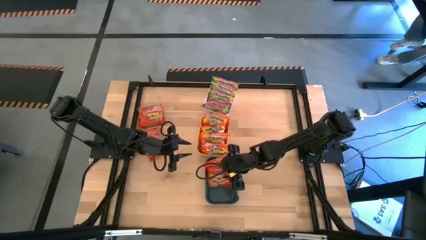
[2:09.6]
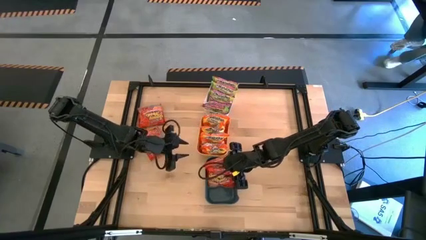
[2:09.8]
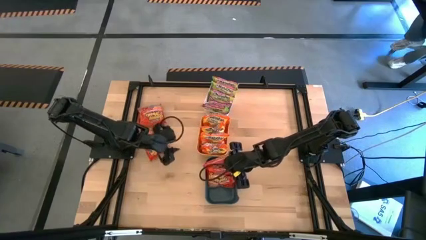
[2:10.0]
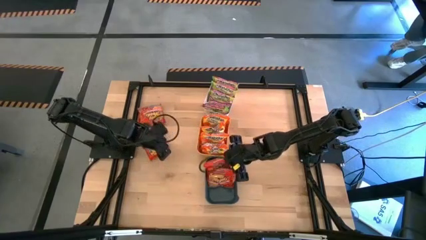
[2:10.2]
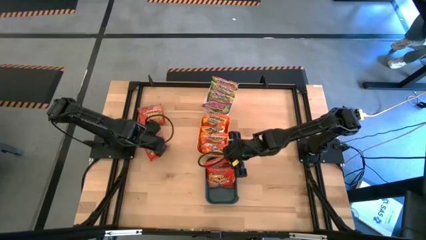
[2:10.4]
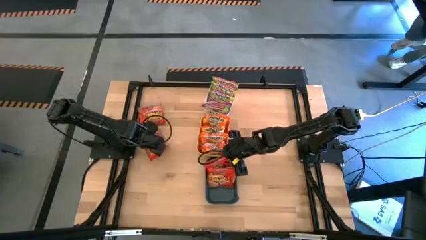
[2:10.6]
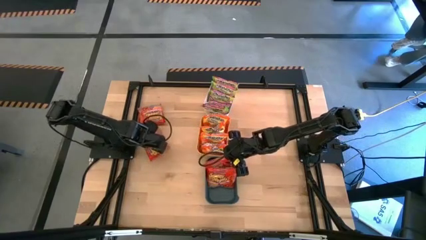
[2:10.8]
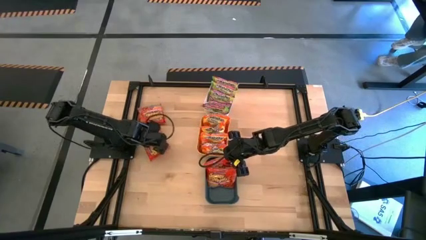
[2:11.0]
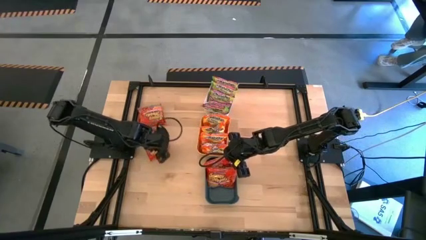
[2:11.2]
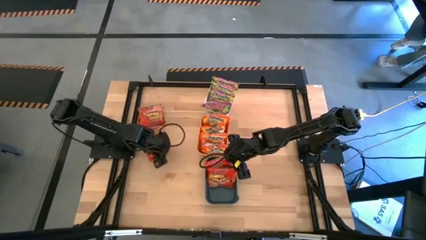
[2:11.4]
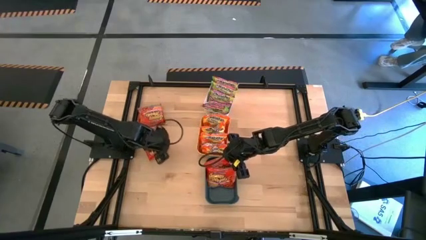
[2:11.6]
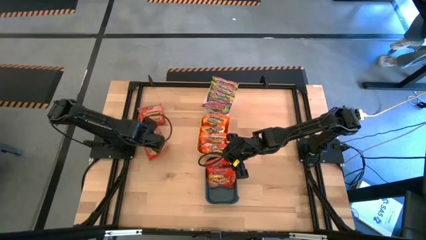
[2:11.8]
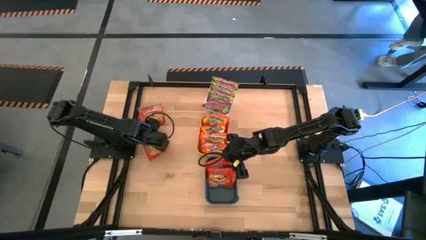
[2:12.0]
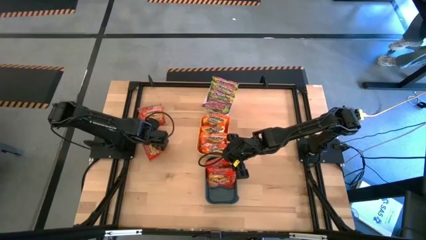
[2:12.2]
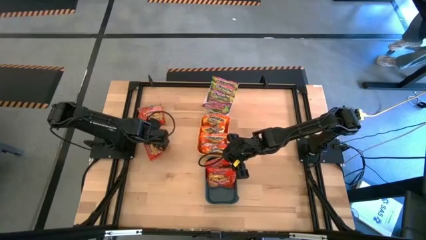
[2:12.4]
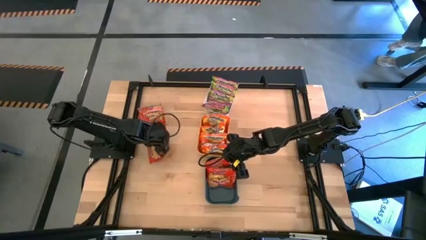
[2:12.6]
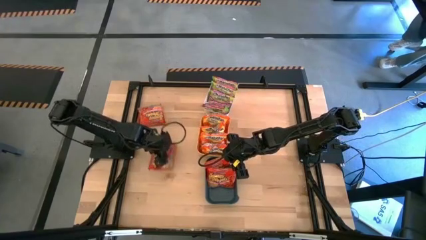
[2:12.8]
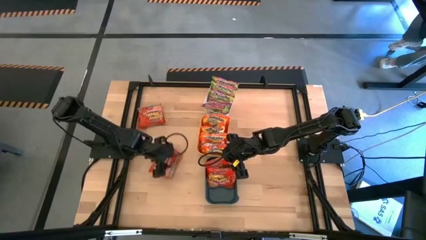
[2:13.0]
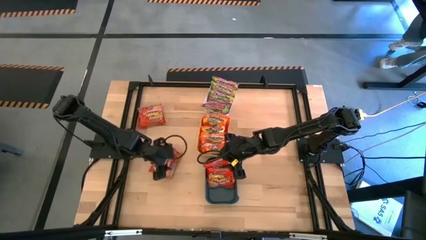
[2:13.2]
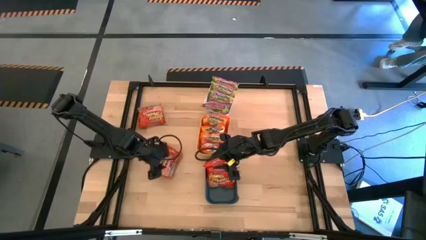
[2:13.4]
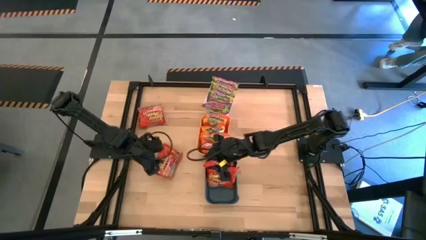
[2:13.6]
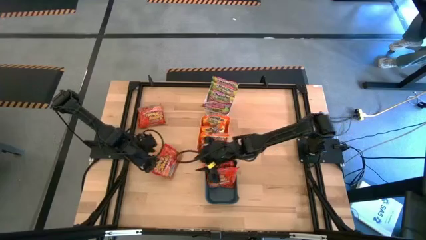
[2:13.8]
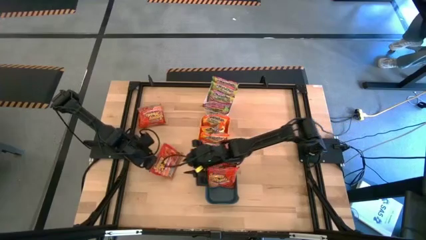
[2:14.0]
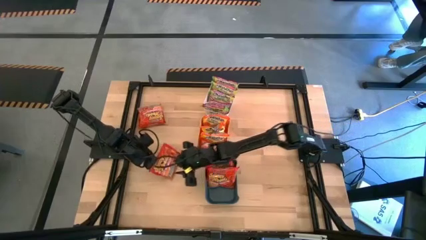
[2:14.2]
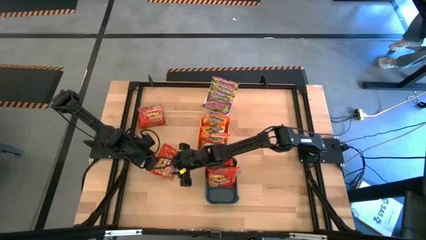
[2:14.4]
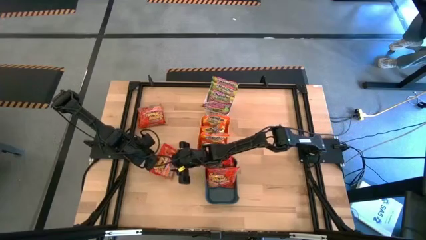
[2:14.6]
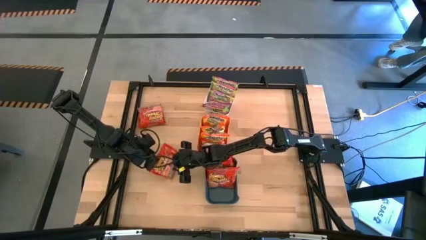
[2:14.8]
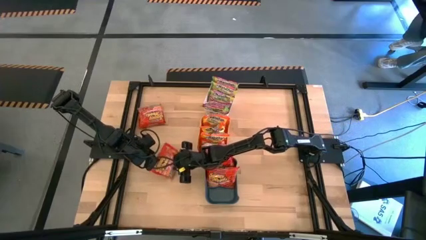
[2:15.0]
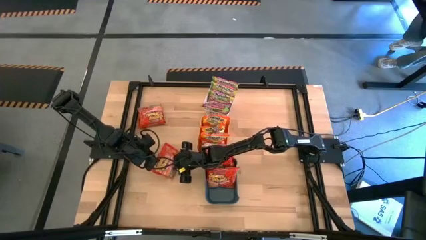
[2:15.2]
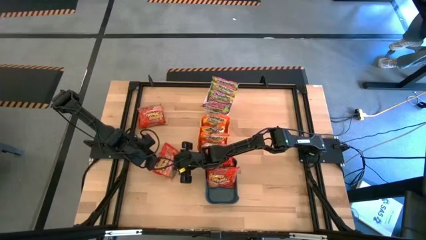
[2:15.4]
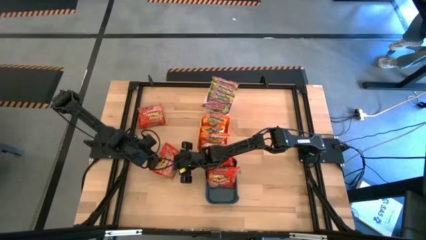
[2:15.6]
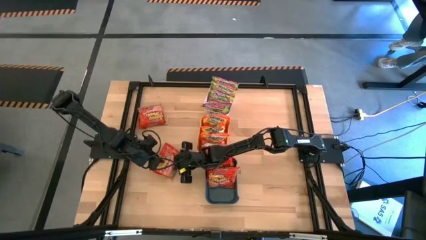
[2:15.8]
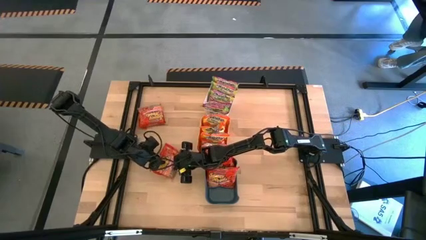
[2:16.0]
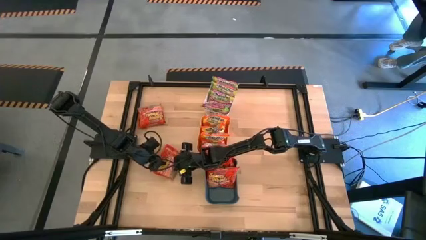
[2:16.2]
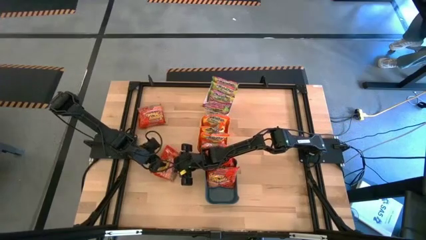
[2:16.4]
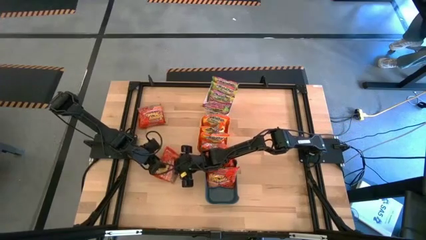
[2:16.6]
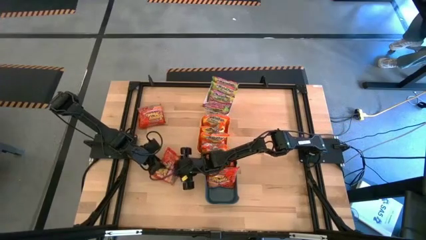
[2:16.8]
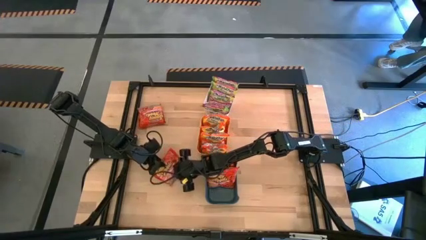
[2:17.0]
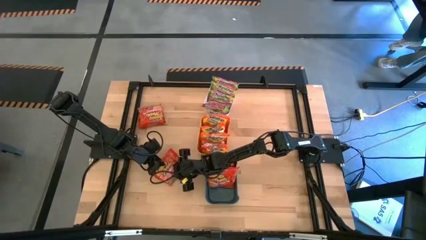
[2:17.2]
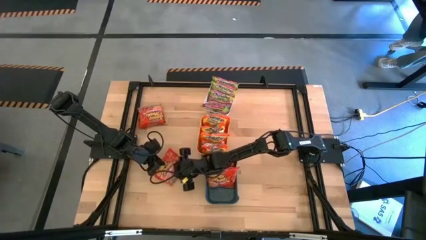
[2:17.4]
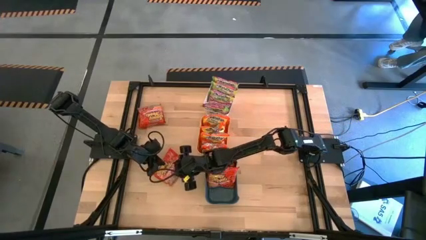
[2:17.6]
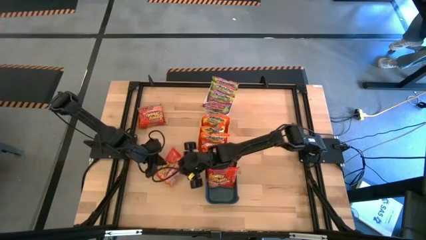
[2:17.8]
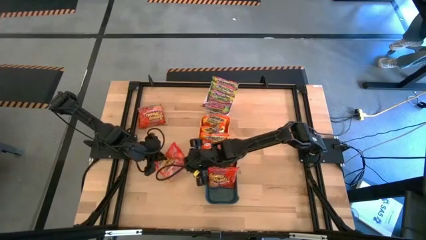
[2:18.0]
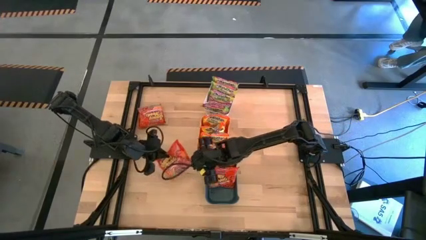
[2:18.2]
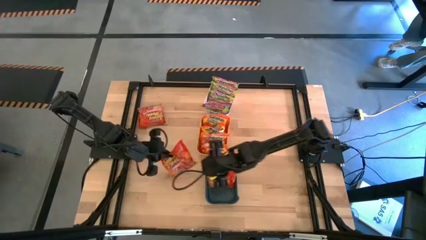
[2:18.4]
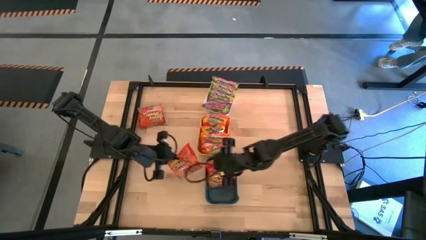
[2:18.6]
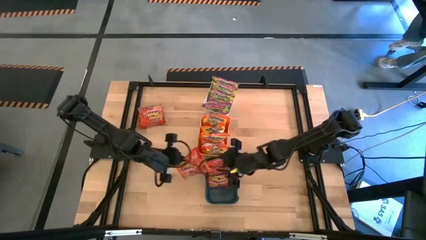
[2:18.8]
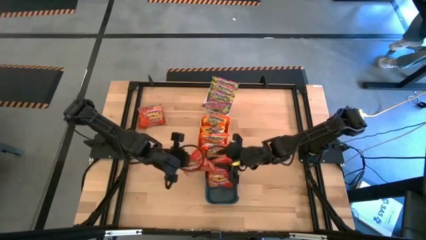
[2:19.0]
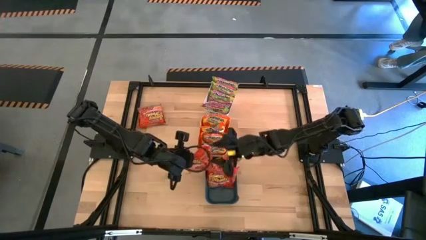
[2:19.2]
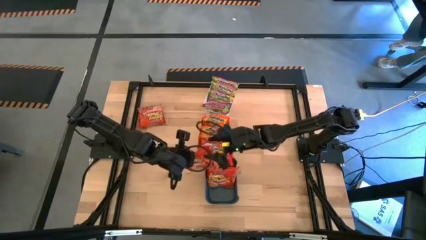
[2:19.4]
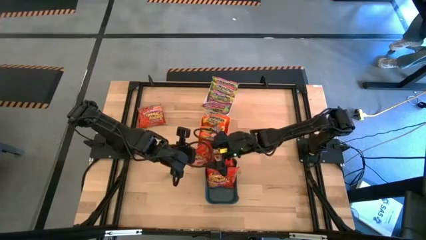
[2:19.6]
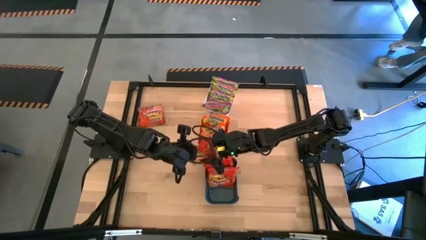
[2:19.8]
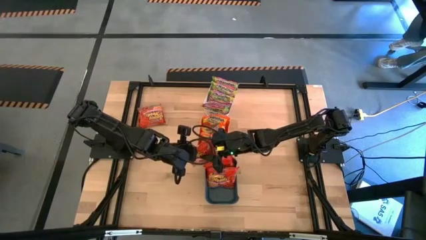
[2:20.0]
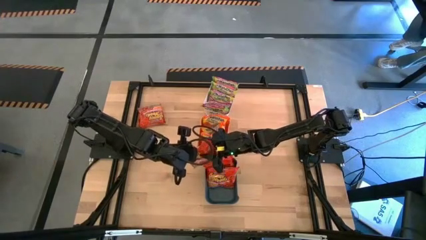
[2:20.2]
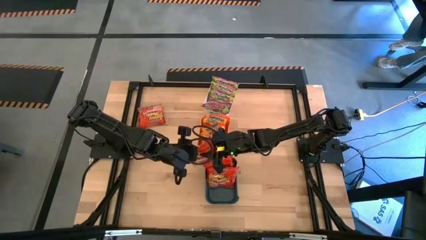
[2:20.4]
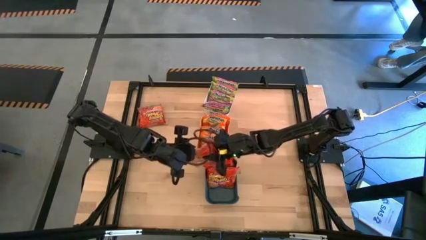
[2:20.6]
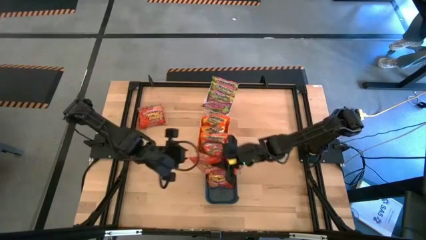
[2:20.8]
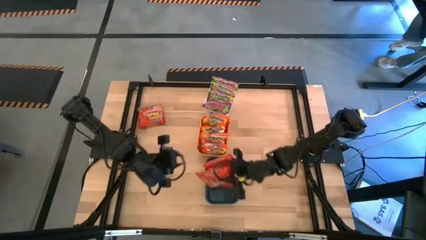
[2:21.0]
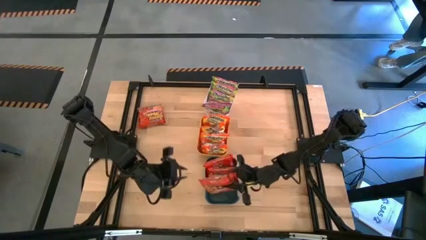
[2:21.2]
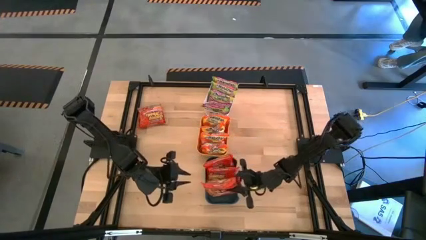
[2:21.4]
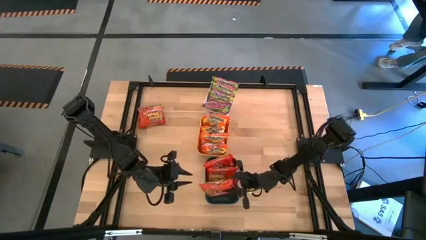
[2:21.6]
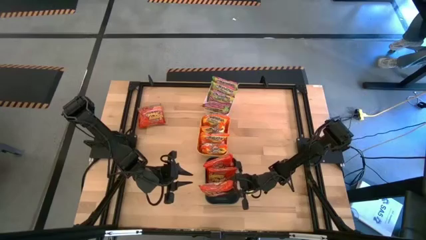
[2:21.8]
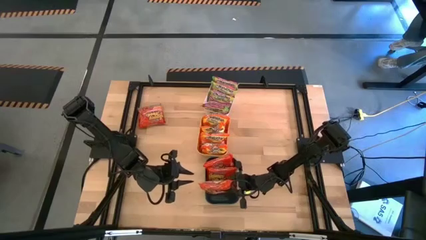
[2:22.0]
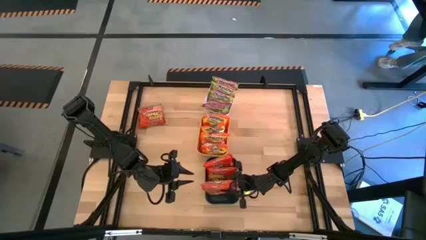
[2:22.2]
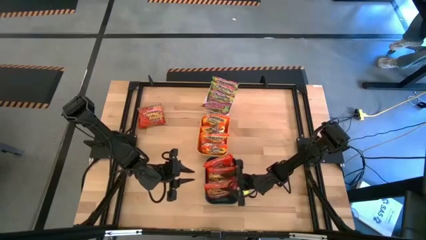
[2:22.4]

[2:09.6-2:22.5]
Task: Sort Maruchan noodles
Put the orange noodle pack into the blue bin

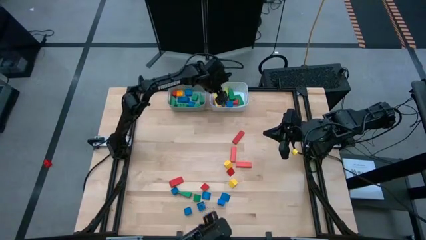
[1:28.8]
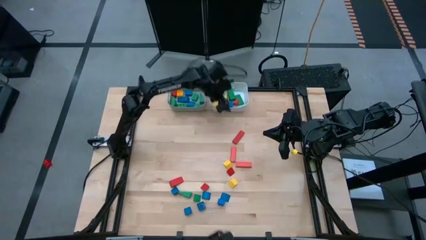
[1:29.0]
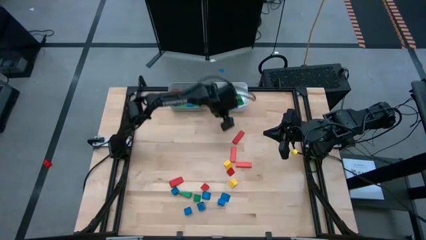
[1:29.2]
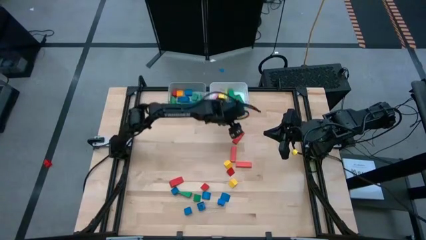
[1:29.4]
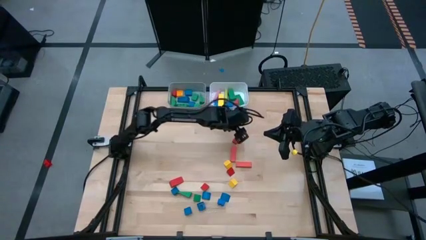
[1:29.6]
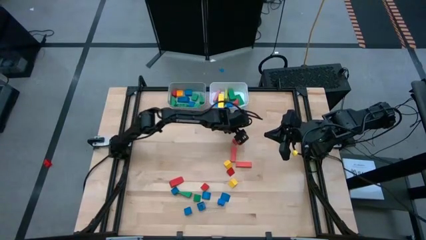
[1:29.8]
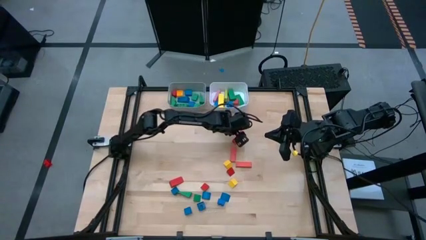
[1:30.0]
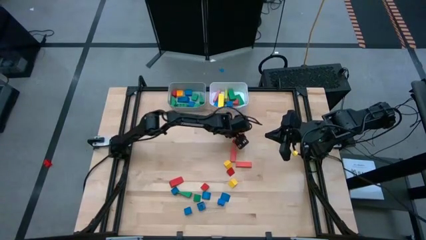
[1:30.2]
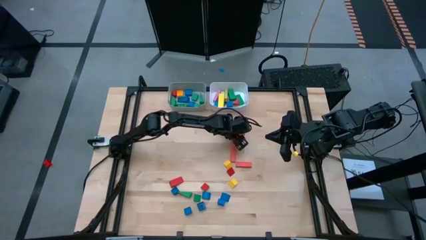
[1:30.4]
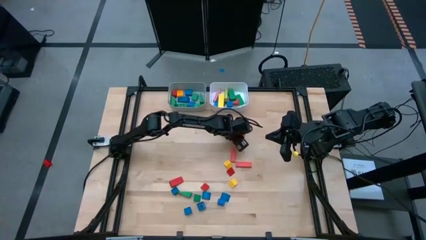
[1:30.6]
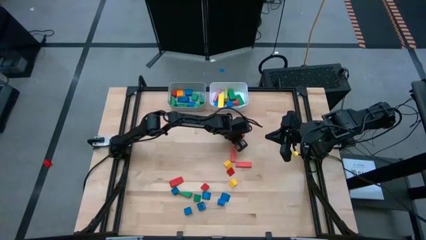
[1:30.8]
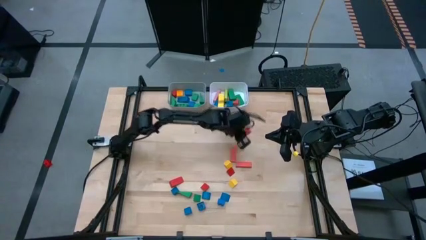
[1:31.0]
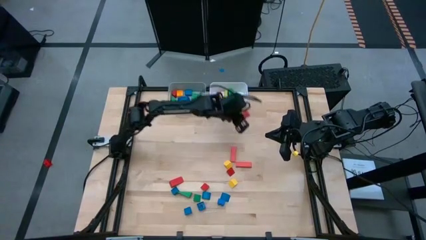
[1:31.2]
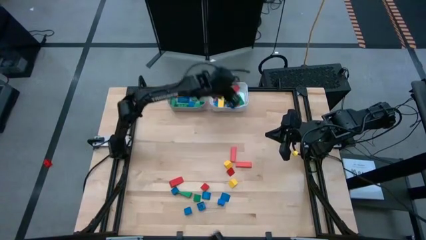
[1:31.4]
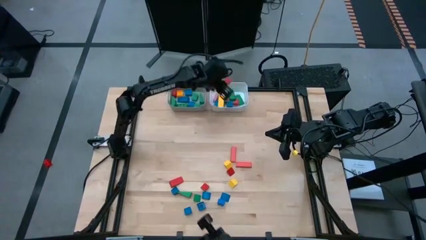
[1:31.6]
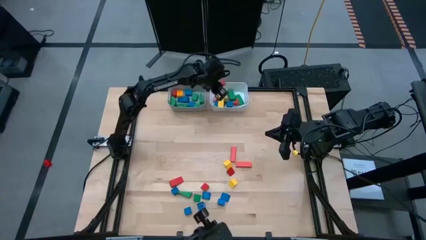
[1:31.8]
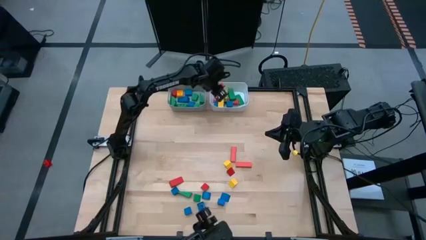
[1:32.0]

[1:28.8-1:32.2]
Task: Sort blocks by size
Put the red rectangular block into the white bin
